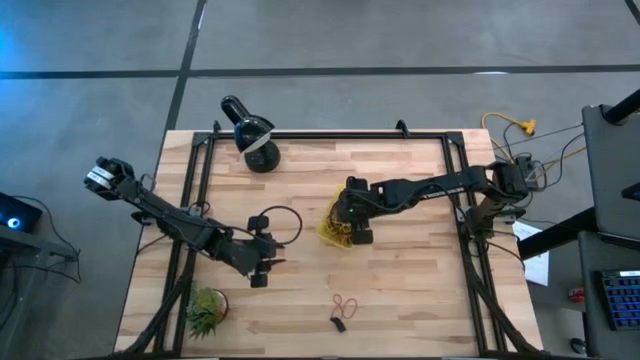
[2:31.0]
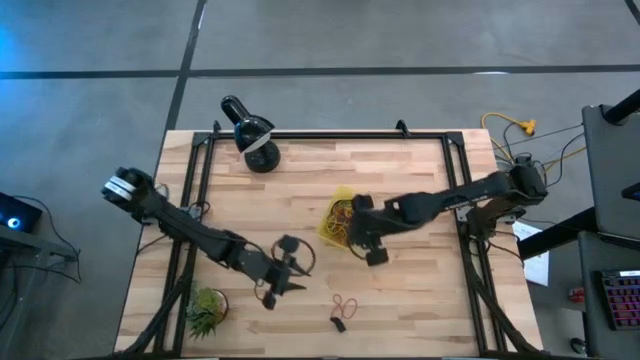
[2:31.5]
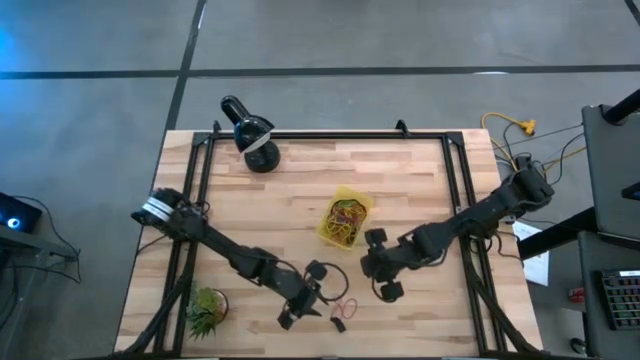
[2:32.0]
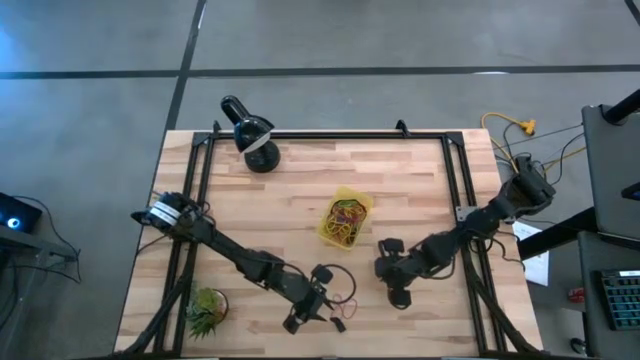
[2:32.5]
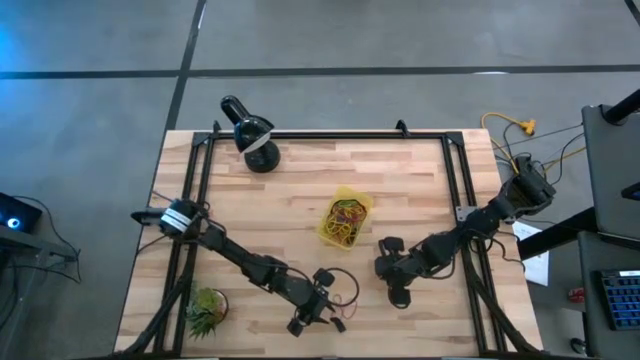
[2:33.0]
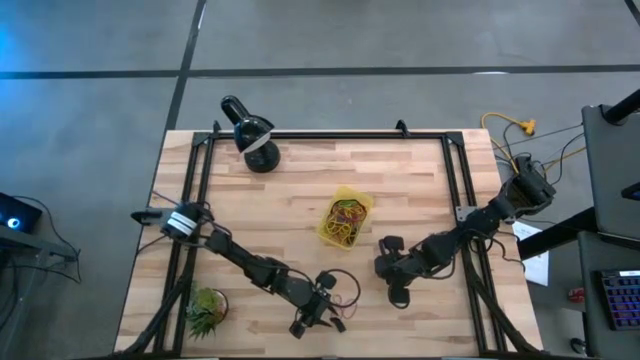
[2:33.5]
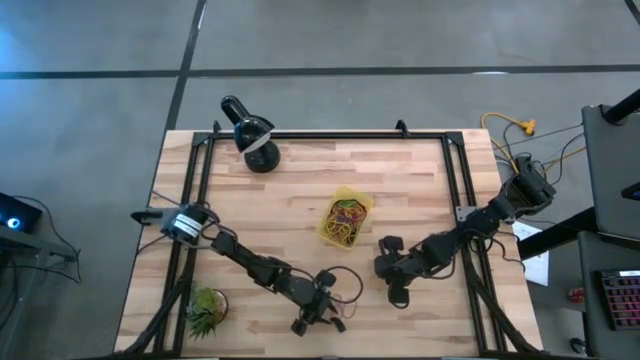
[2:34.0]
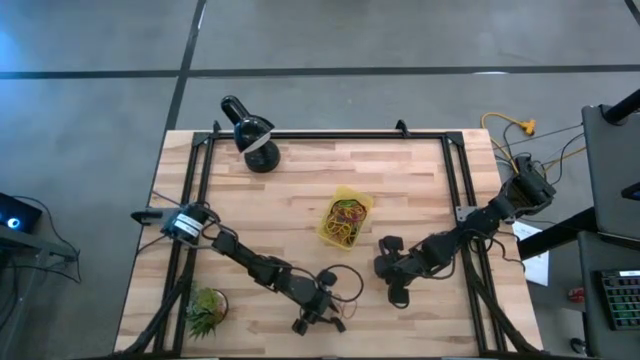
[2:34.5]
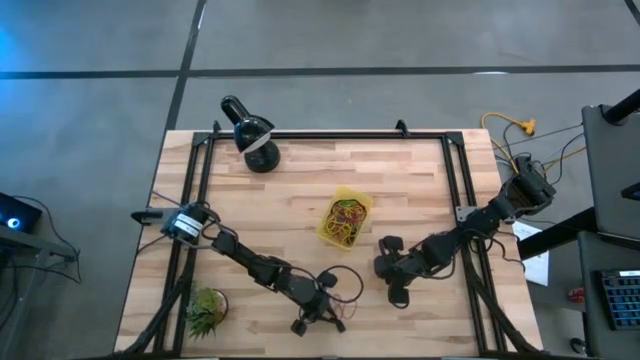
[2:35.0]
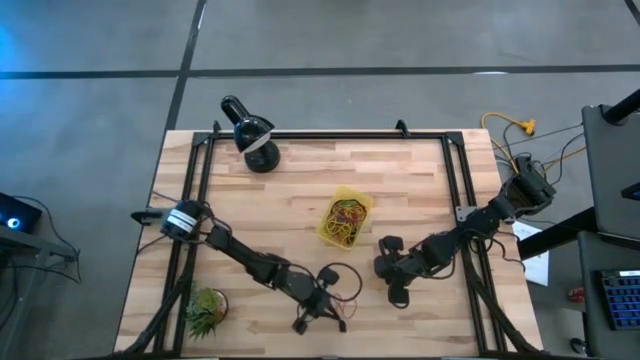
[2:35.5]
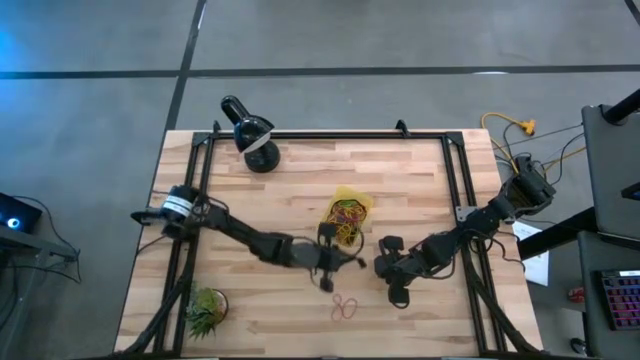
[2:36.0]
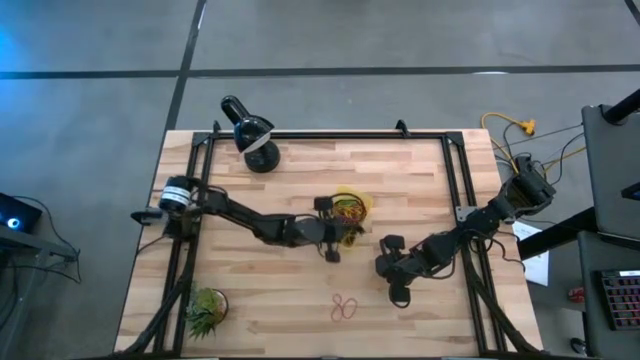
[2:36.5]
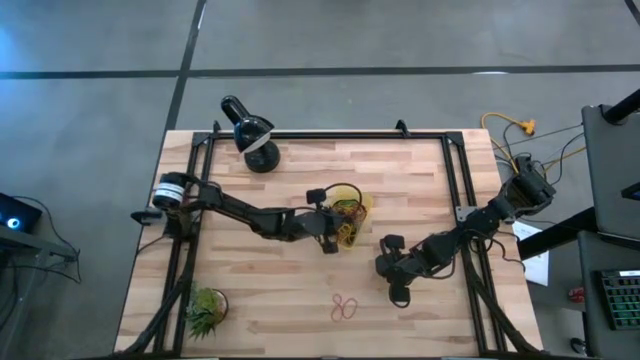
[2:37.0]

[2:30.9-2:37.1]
Task: Pick and place rubber bands into bin
Put the black rubber band into the yellow bin

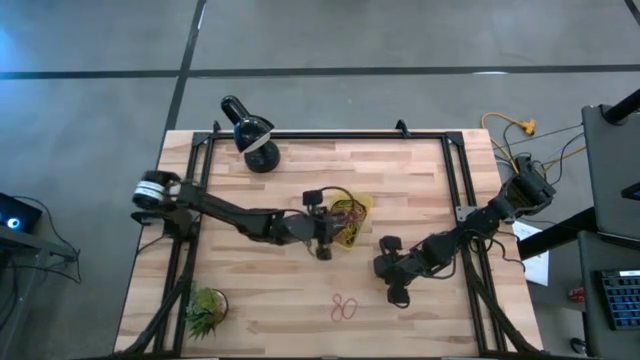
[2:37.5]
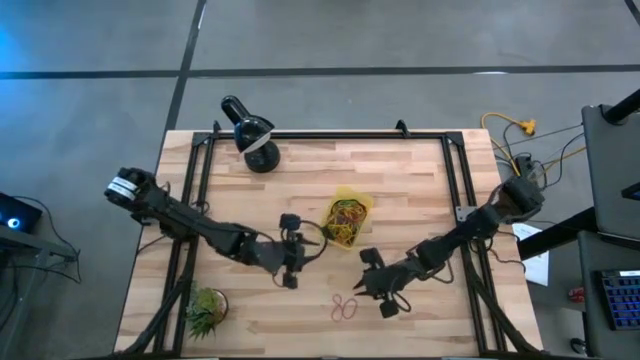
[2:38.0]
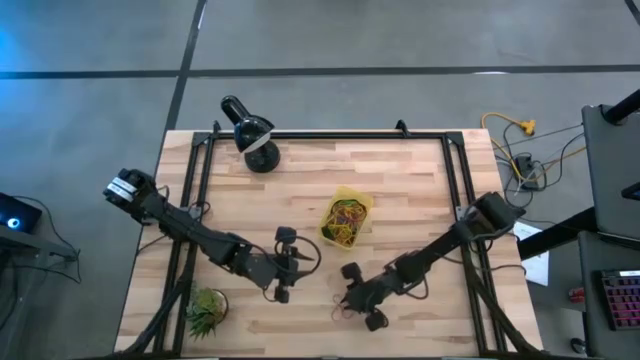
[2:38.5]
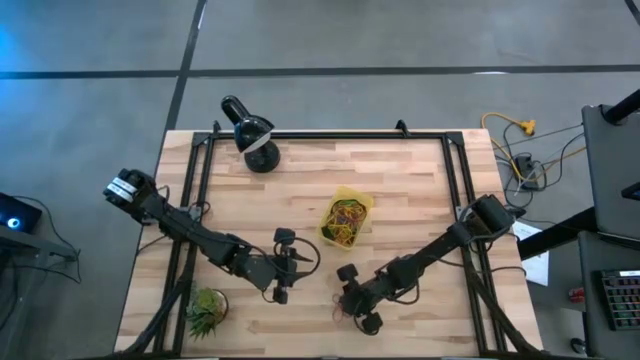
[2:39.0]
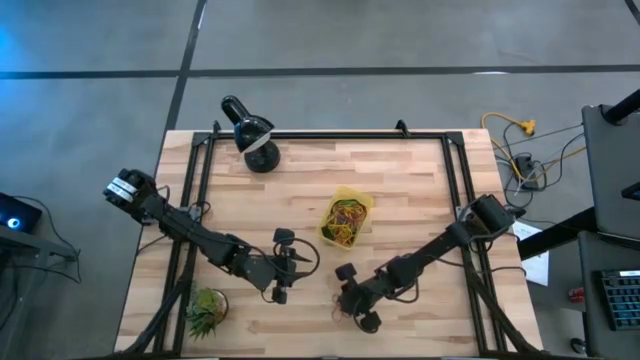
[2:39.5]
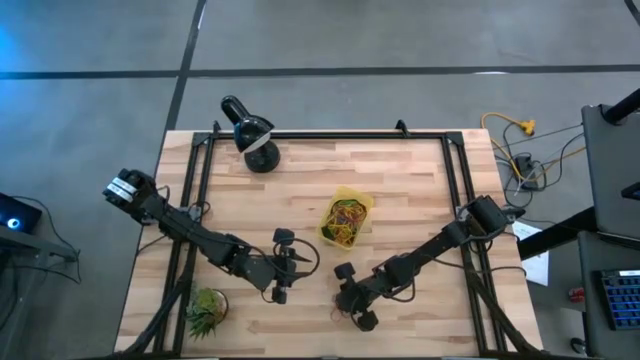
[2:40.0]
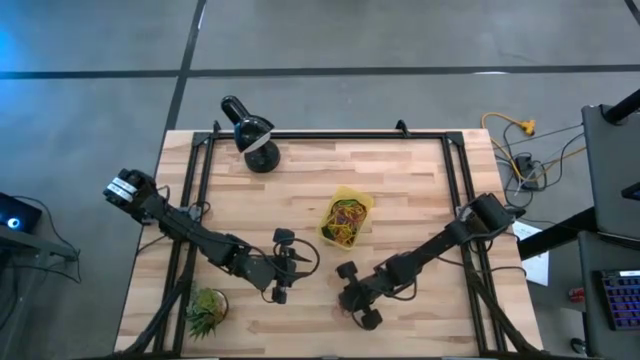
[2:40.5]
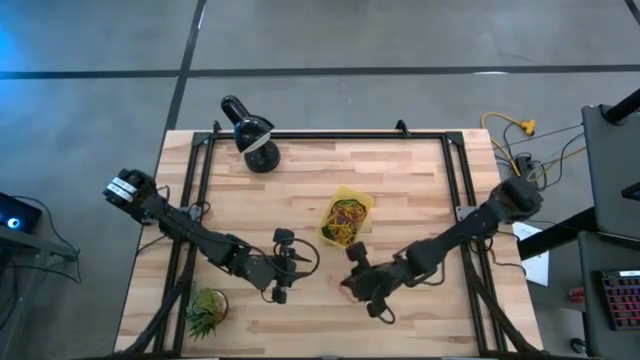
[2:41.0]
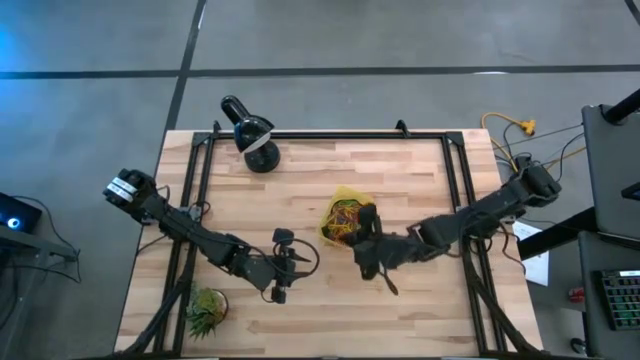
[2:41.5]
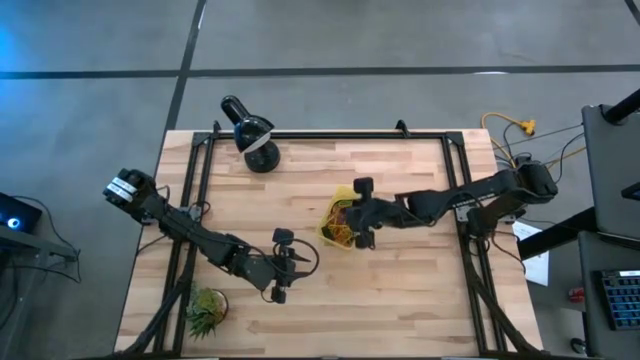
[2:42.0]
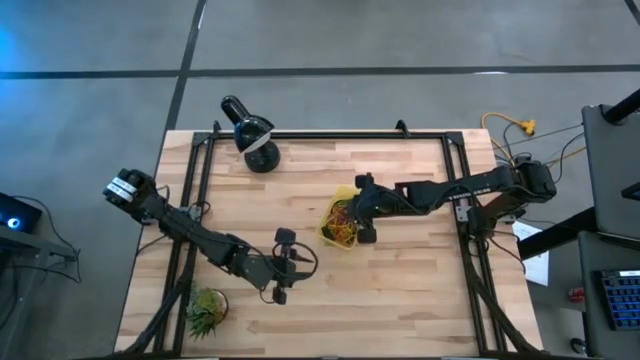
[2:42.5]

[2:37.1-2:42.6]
Put the red rubber band into the yellow bin

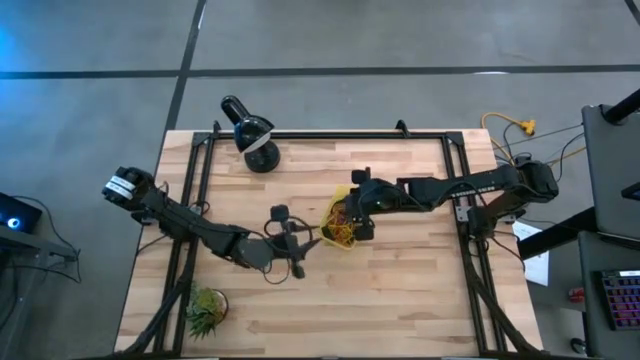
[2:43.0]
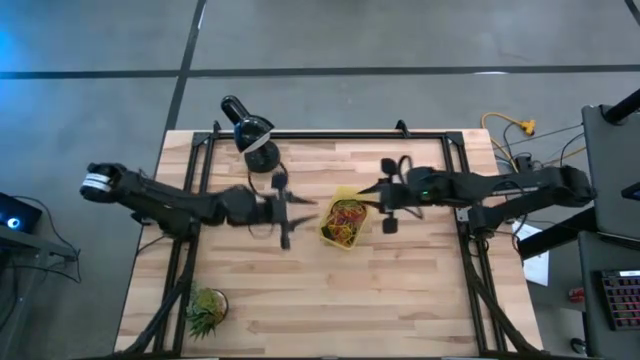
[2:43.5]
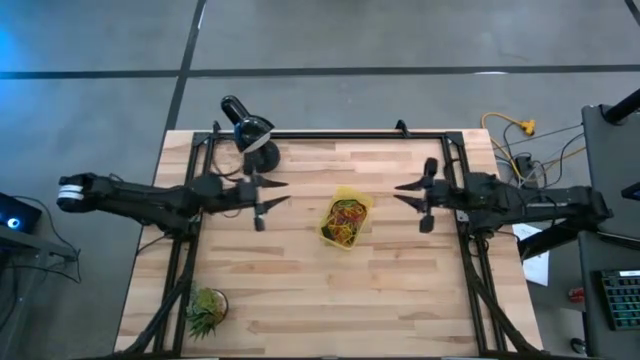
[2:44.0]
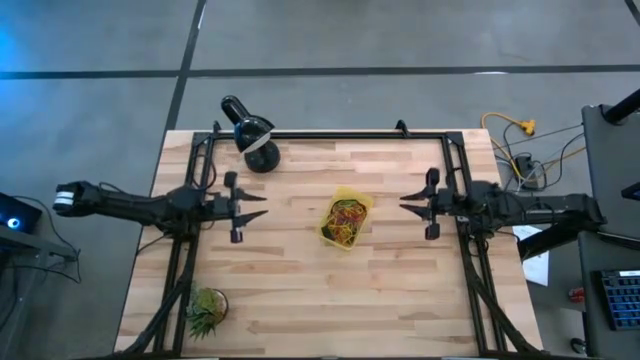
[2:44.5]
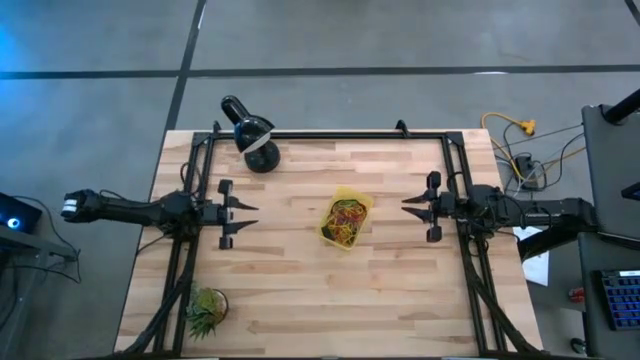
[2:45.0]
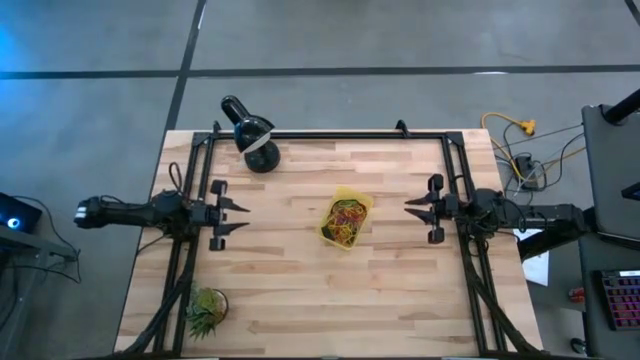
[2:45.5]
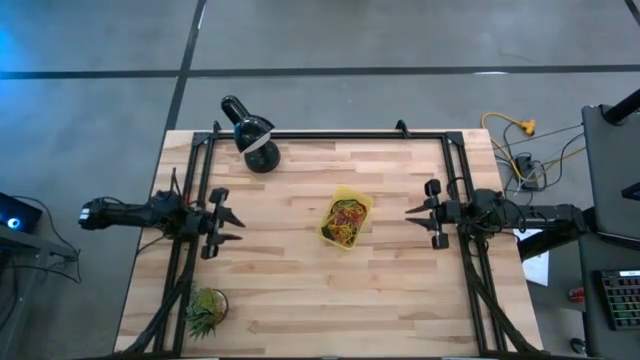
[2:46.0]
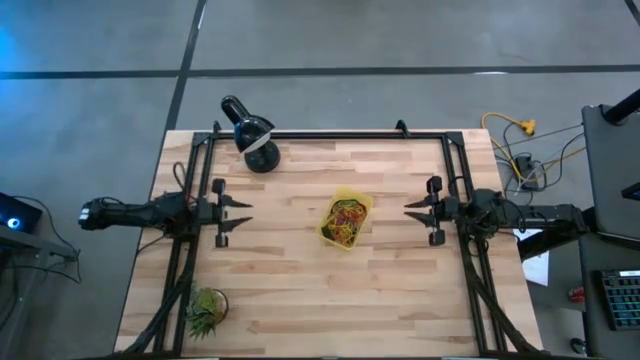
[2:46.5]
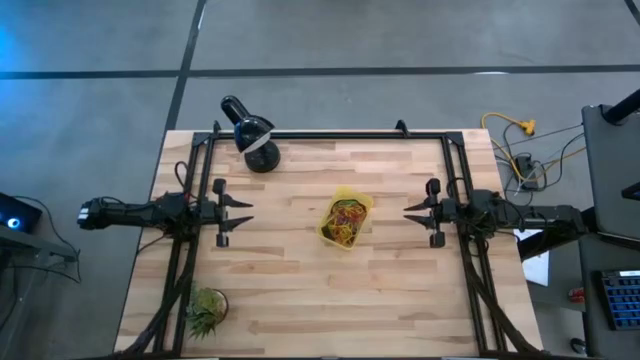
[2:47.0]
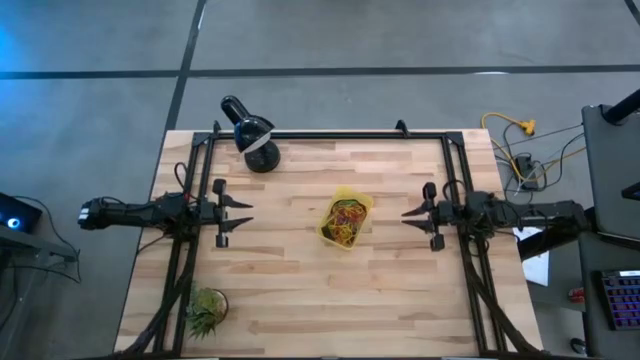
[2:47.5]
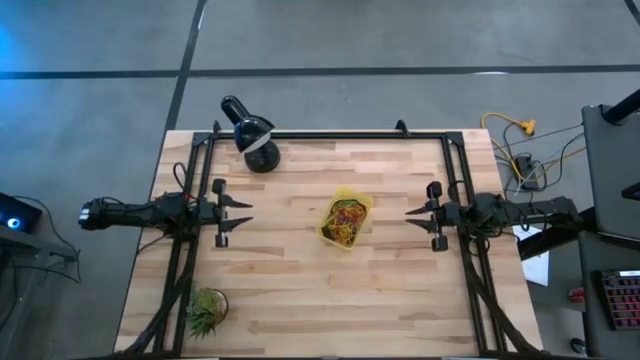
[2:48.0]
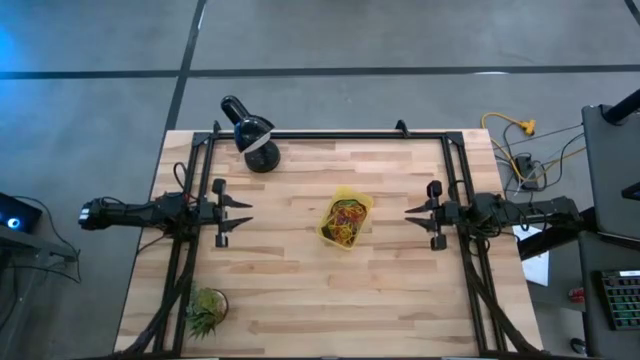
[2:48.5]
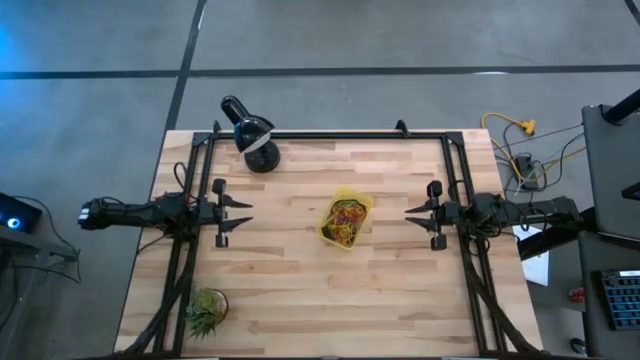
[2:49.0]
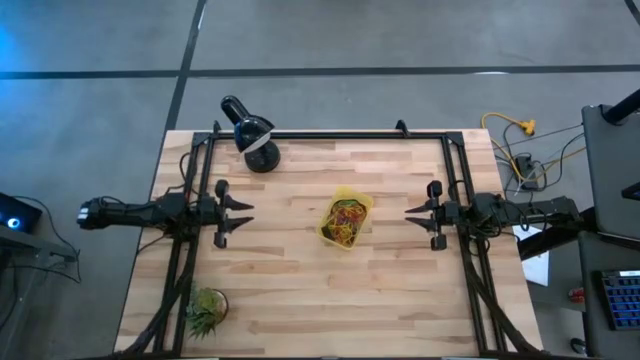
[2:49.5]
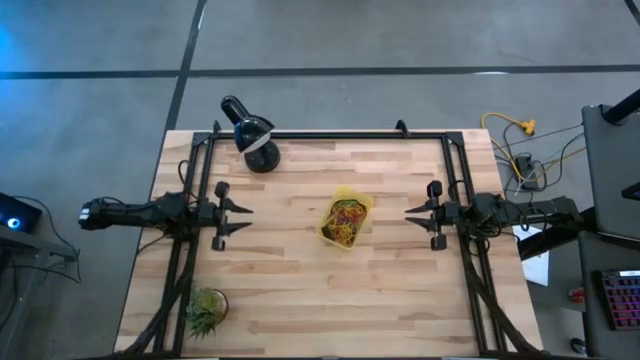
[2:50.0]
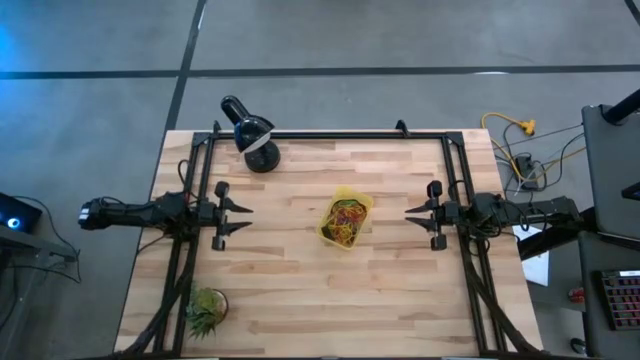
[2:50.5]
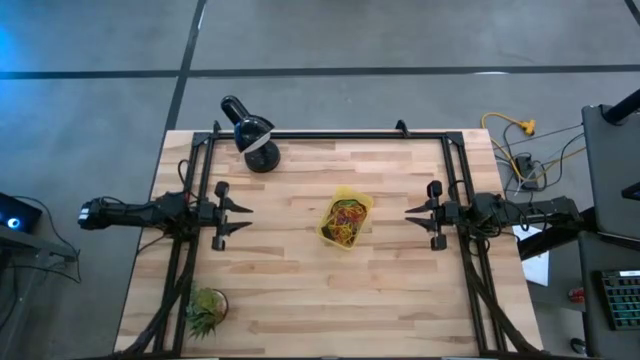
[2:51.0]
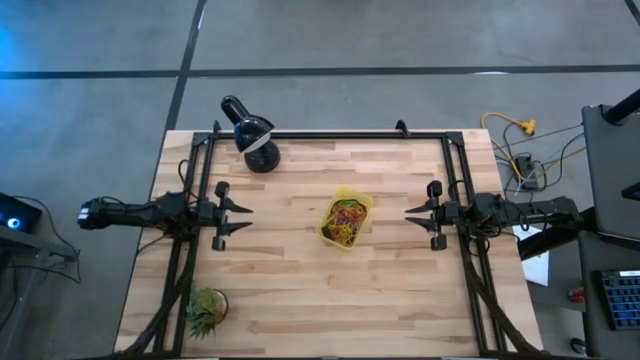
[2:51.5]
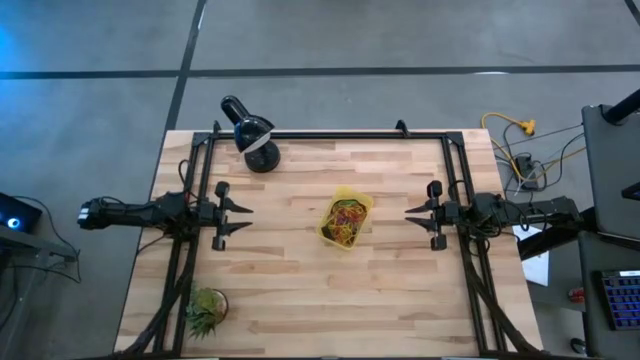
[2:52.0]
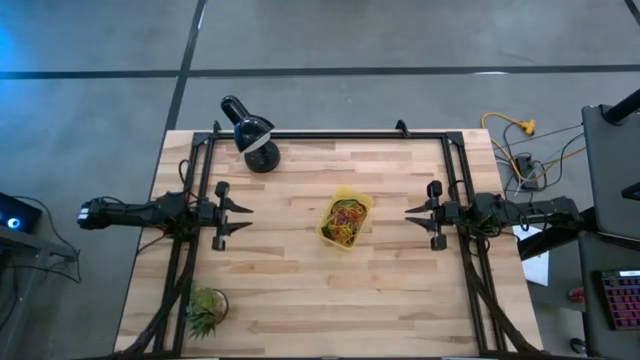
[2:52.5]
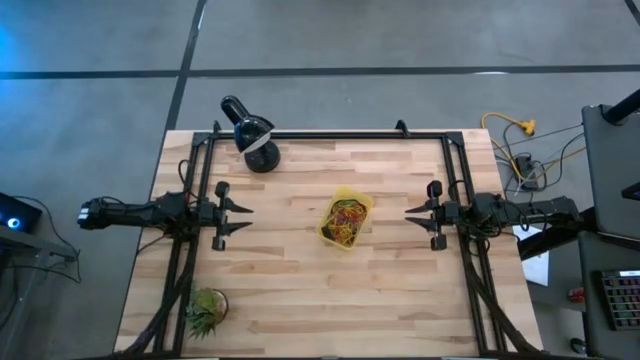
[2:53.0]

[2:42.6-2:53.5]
Return to Home Position
